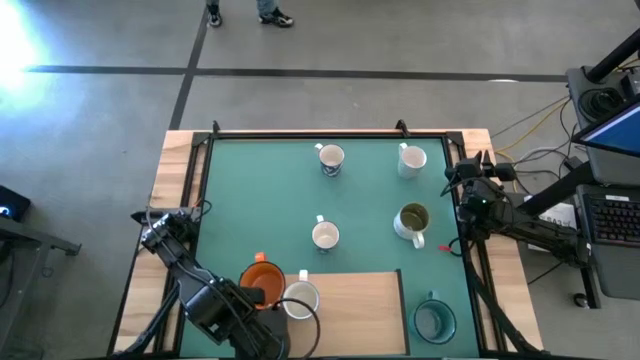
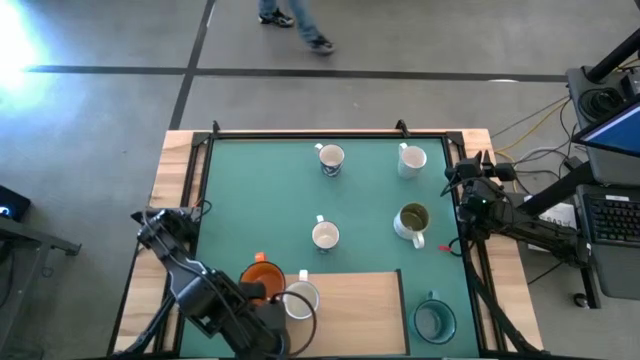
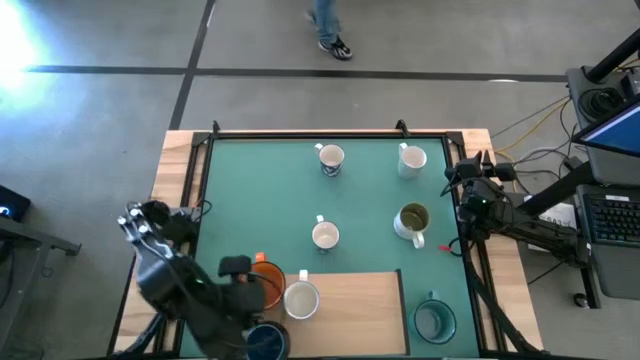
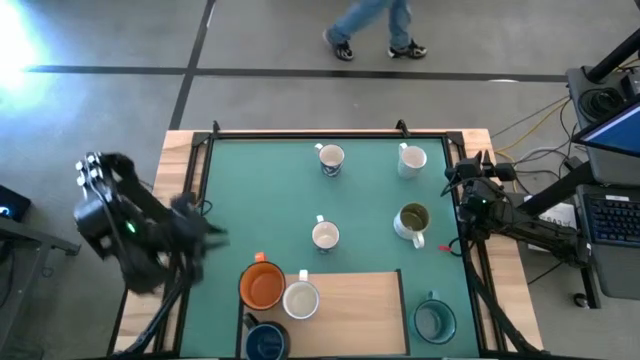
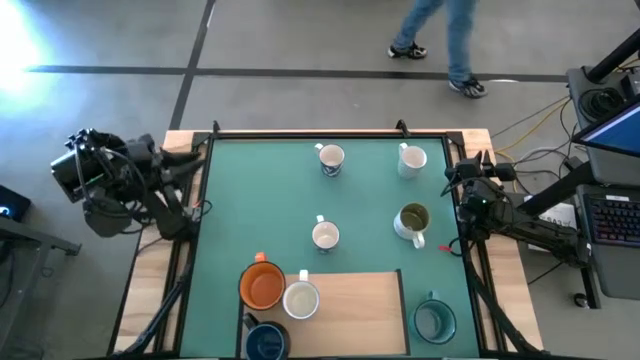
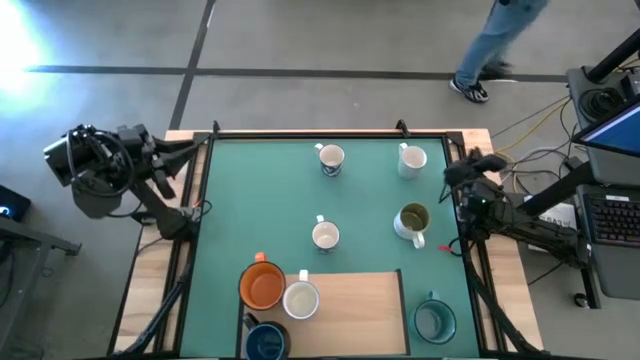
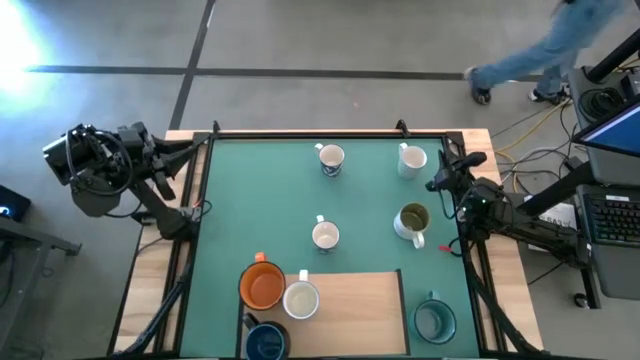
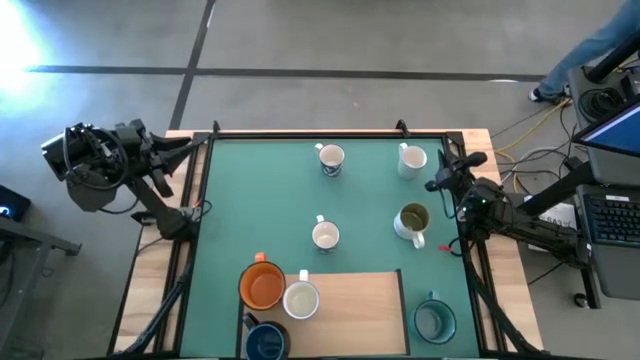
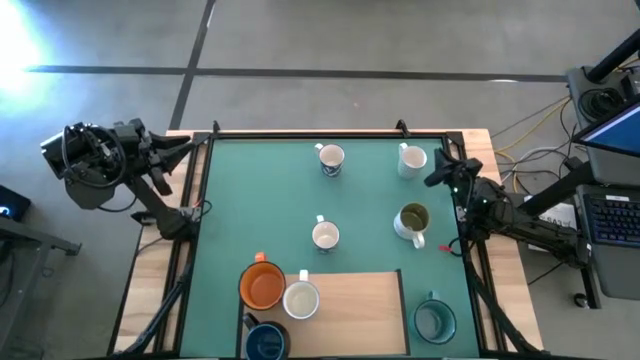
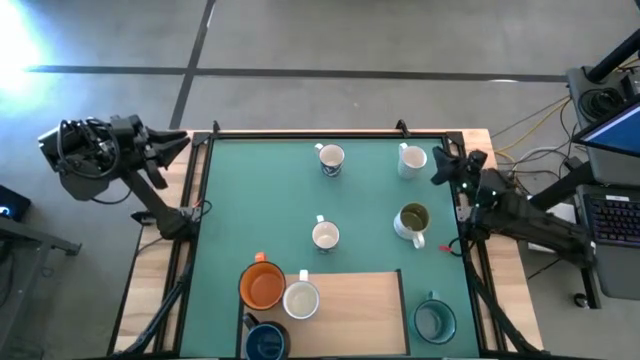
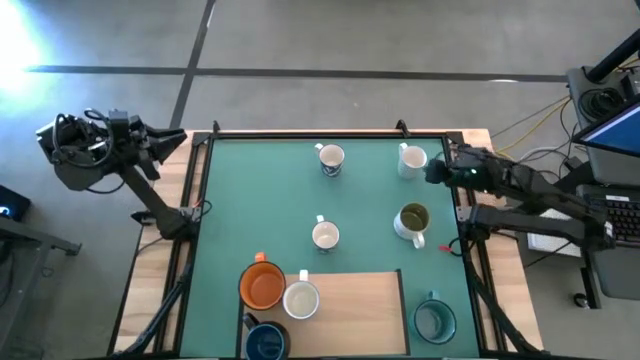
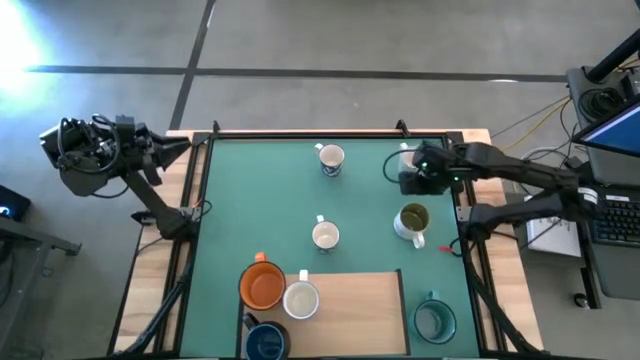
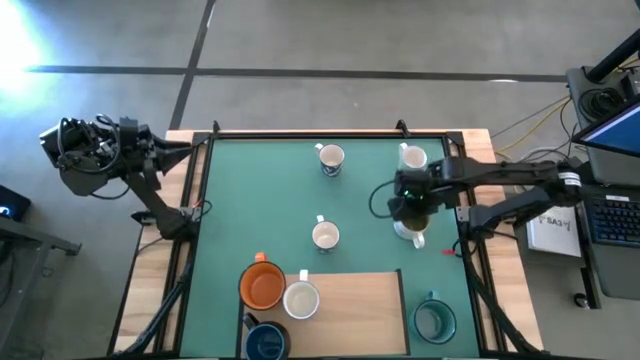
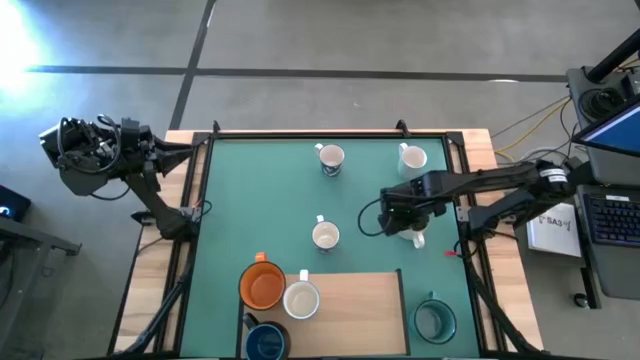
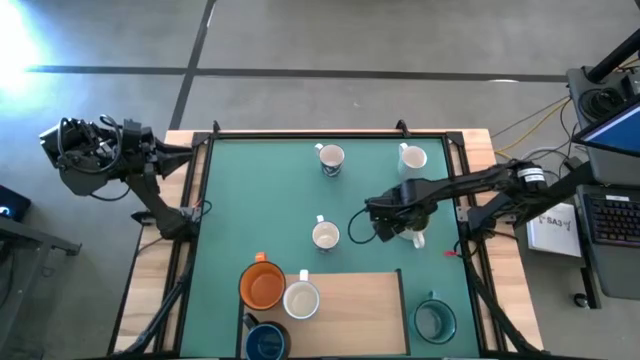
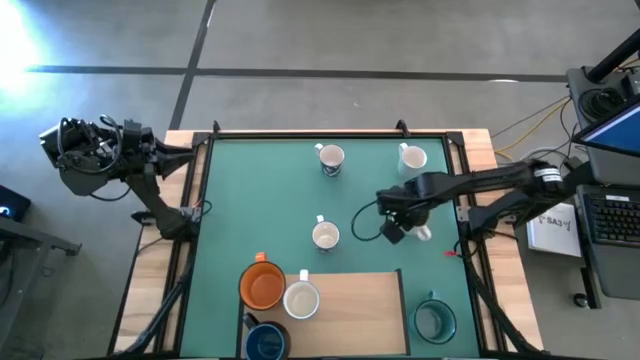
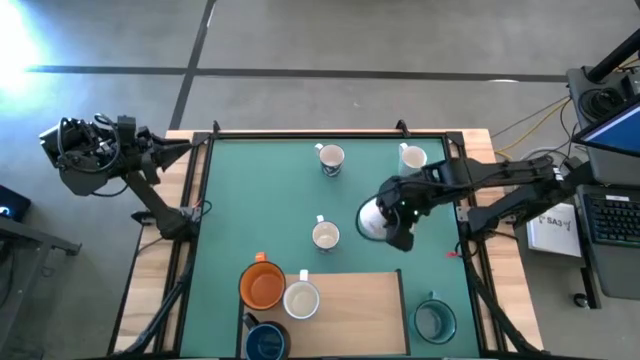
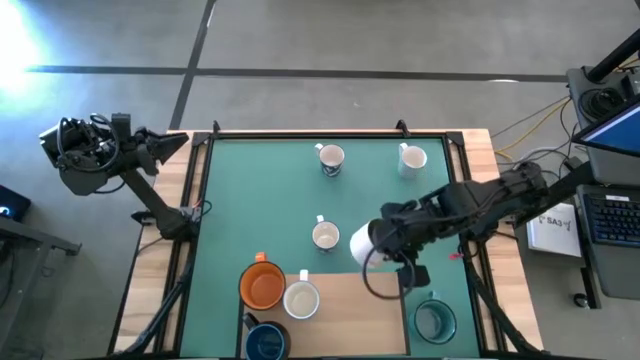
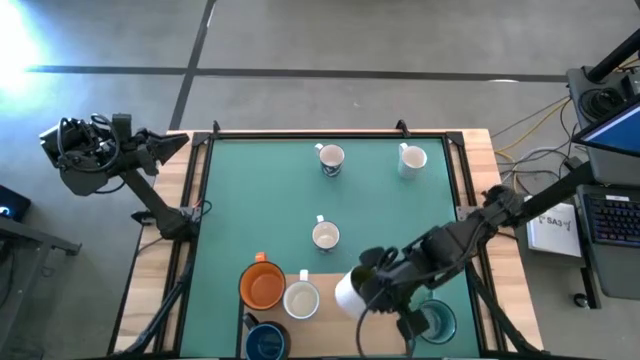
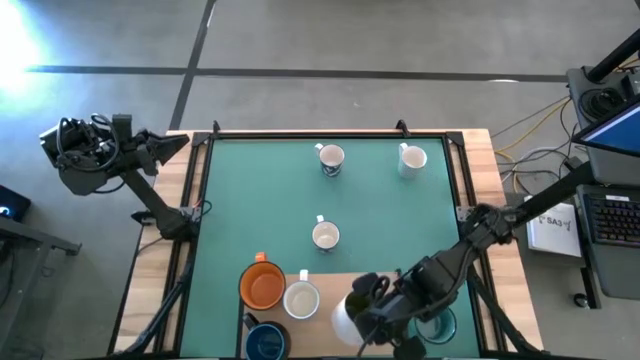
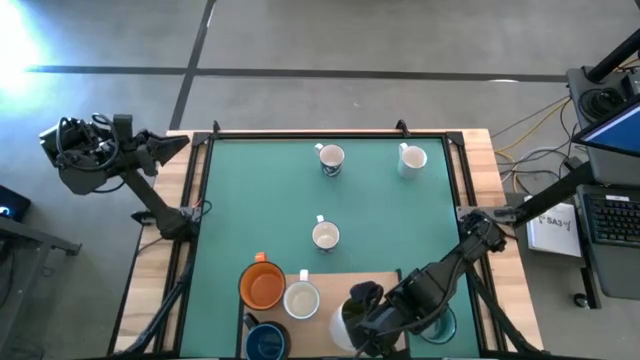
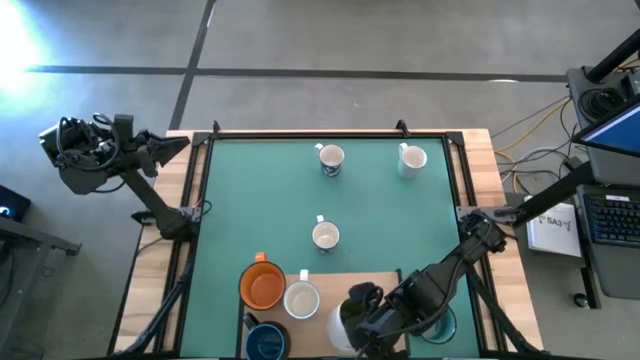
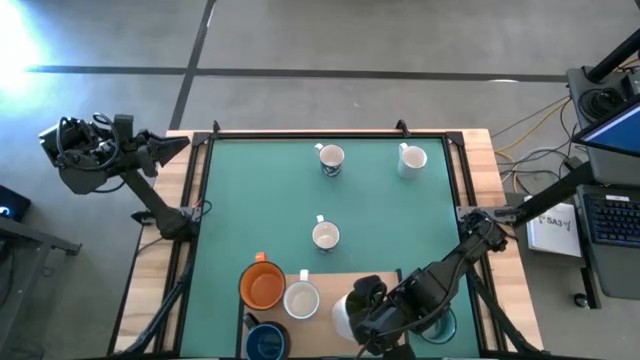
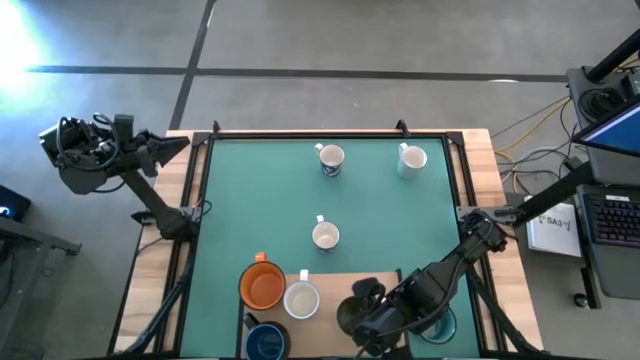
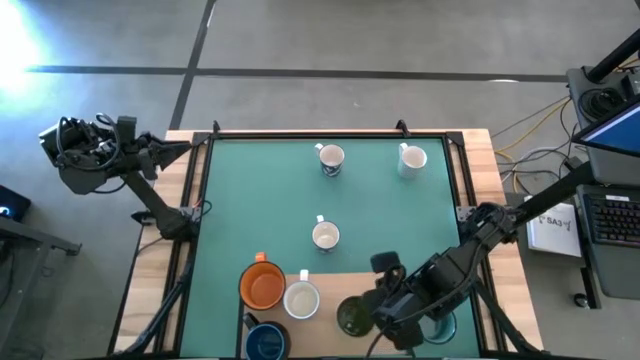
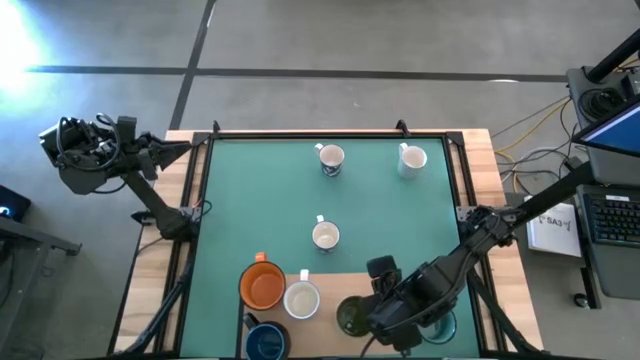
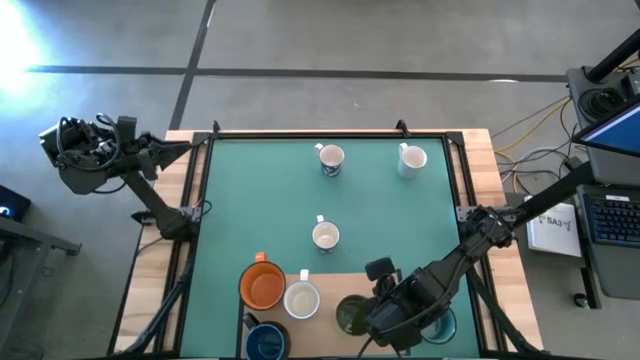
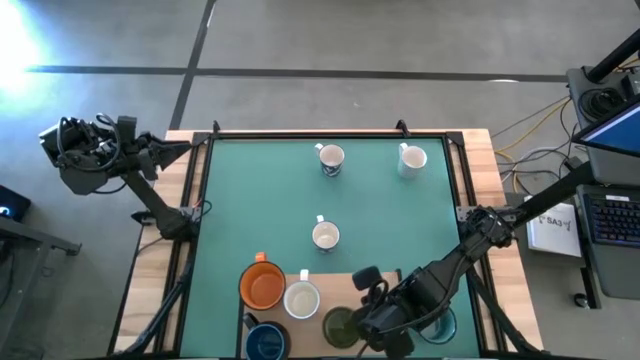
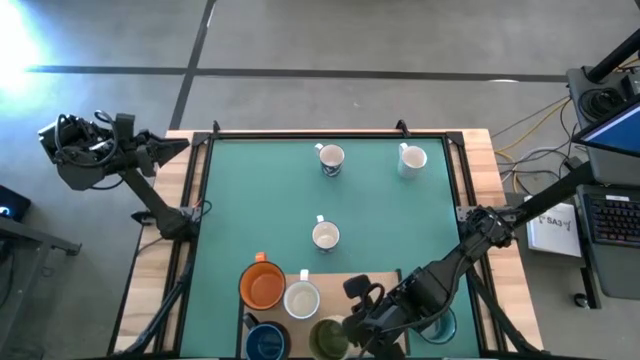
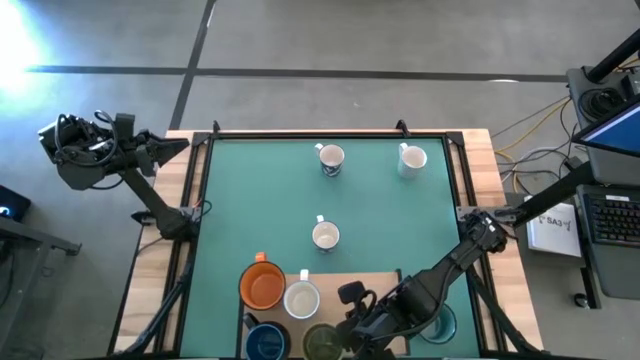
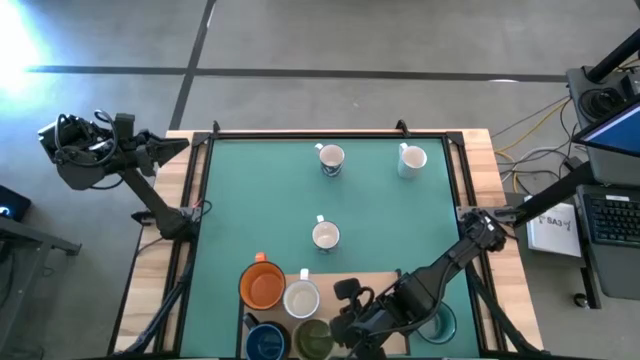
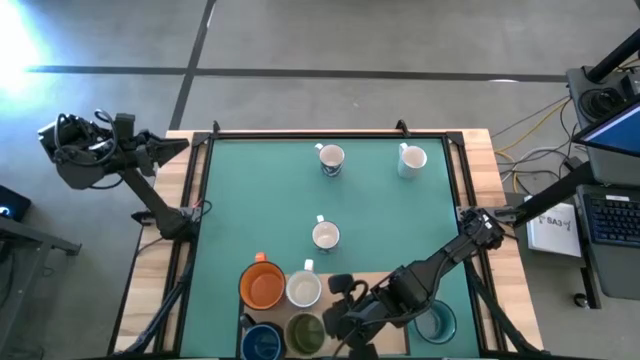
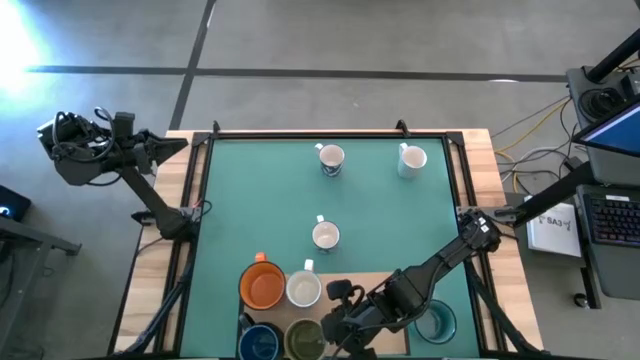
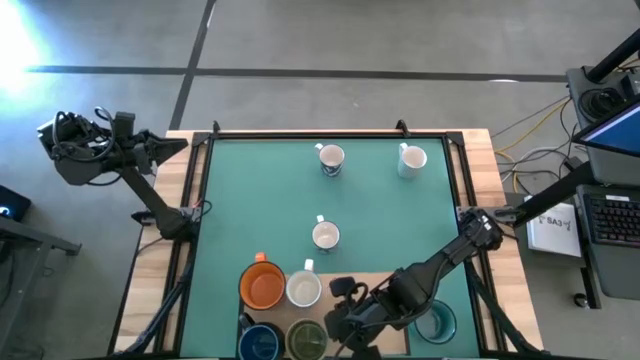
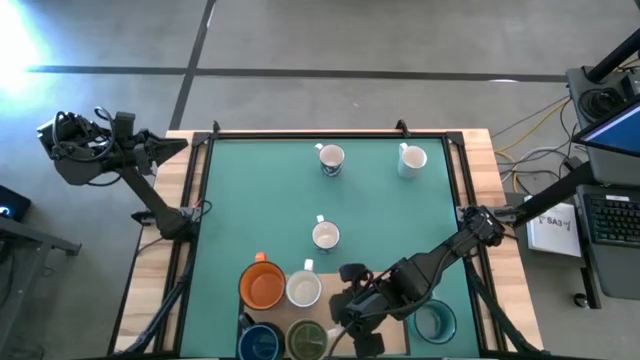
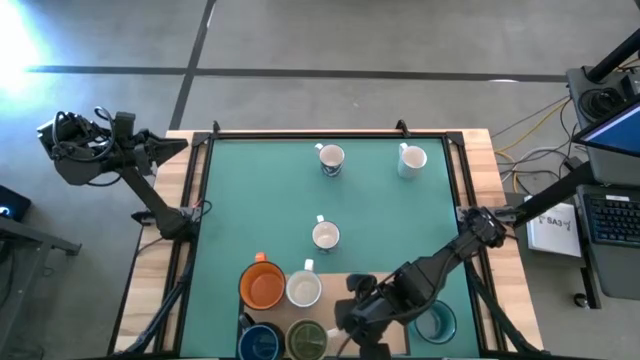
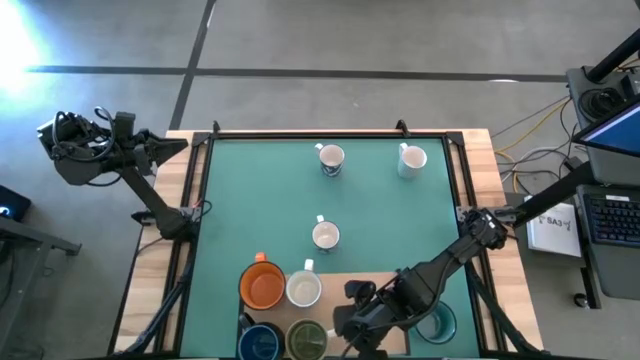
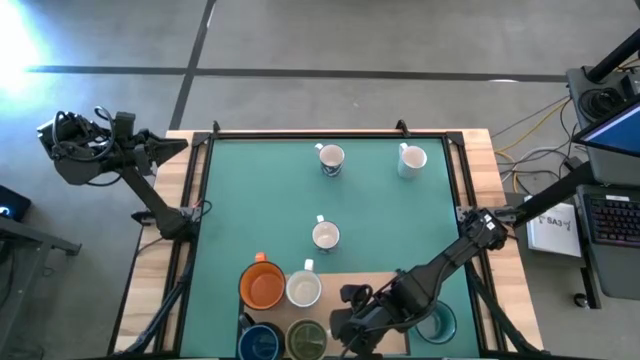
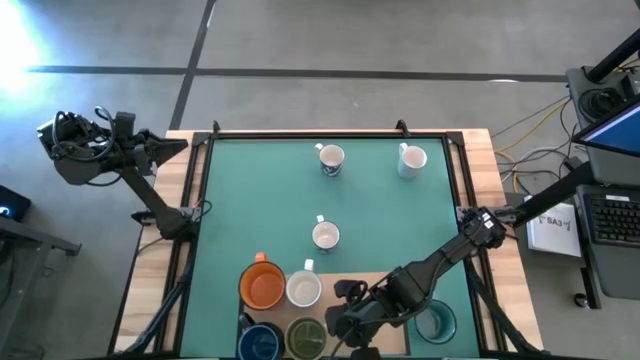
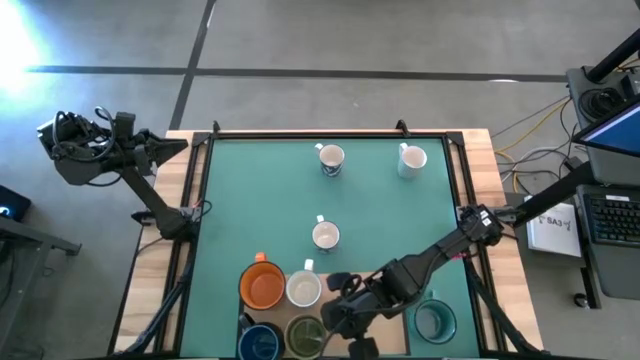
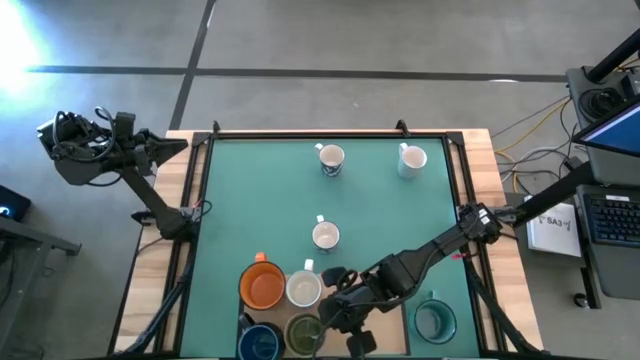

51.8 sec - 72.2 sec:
Task: Place coffee mugs
Put the white green mug on the shelf

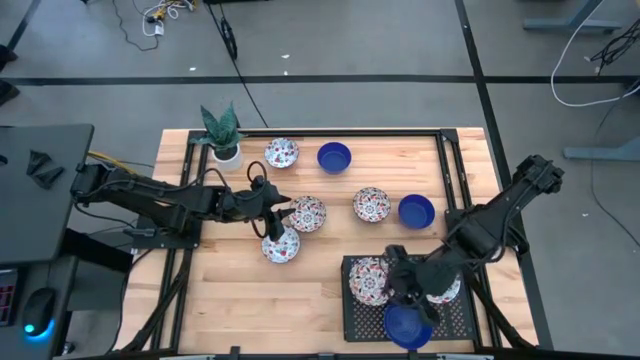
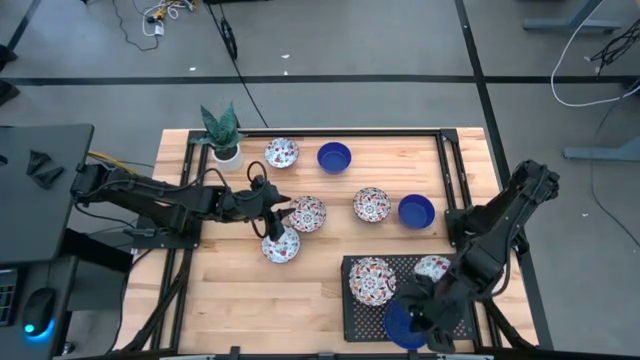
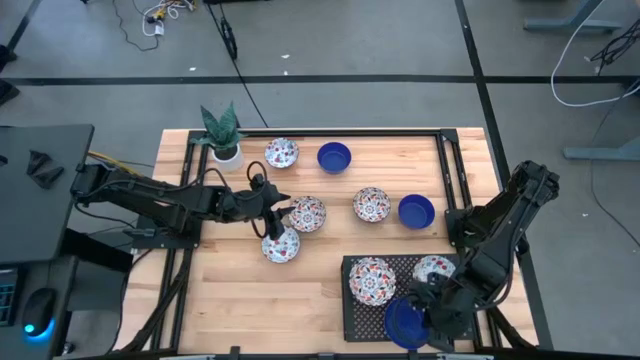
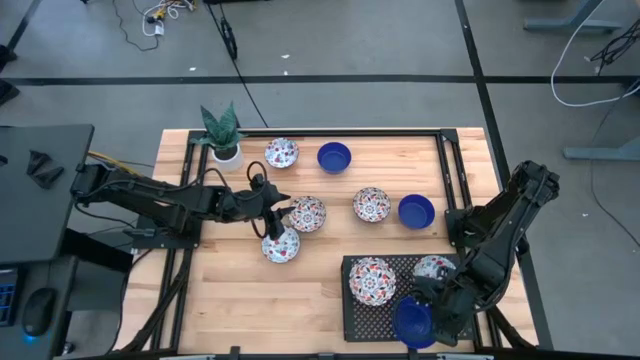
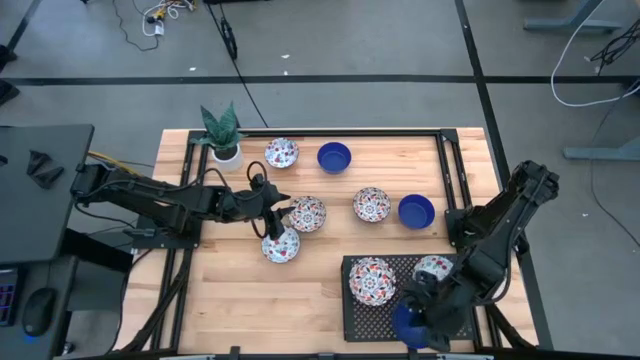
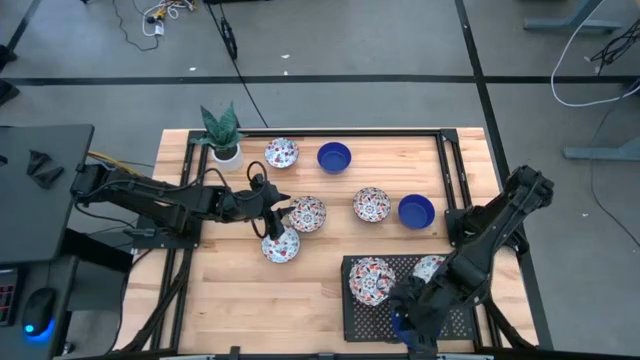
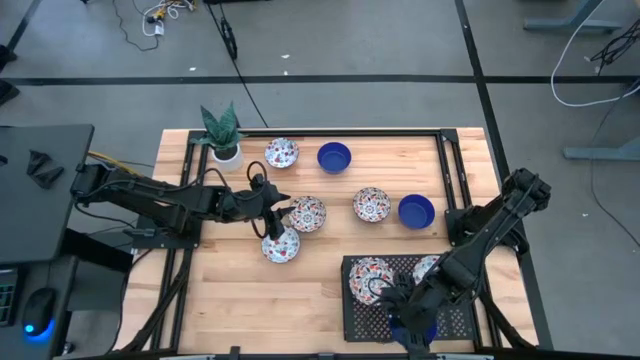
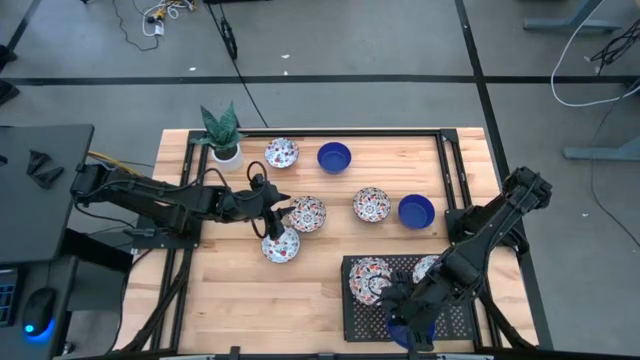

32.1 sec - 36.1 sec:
Task: Pick & Place Mini bowls
Adjust the blue bowl on the shelf
